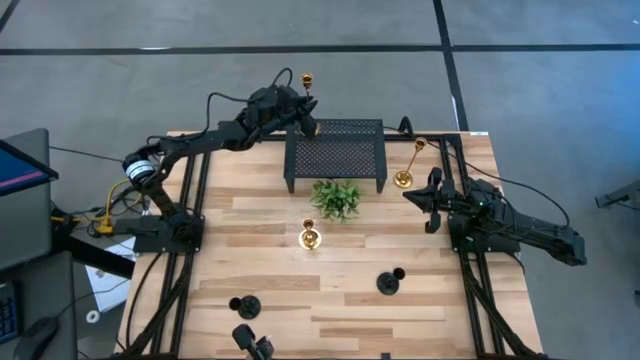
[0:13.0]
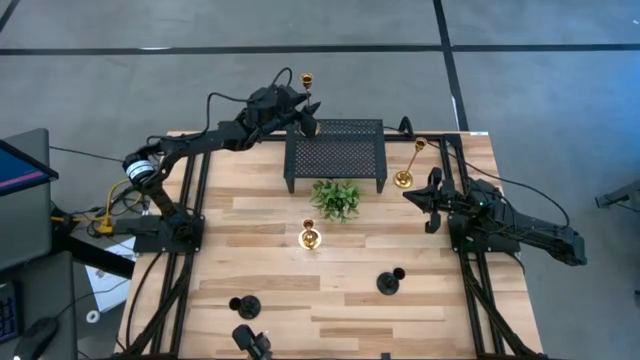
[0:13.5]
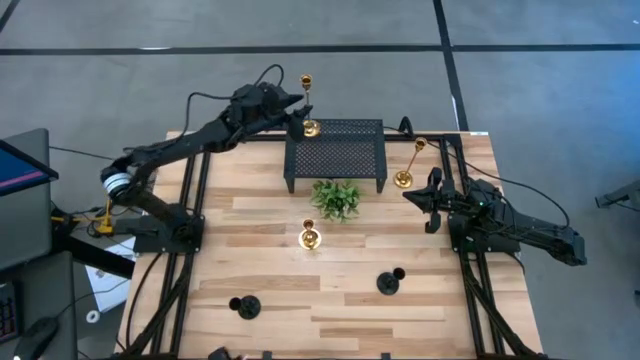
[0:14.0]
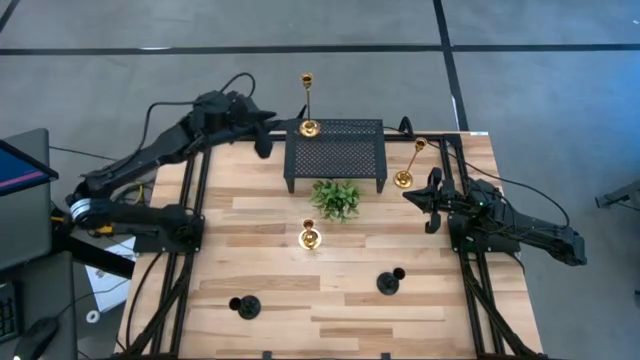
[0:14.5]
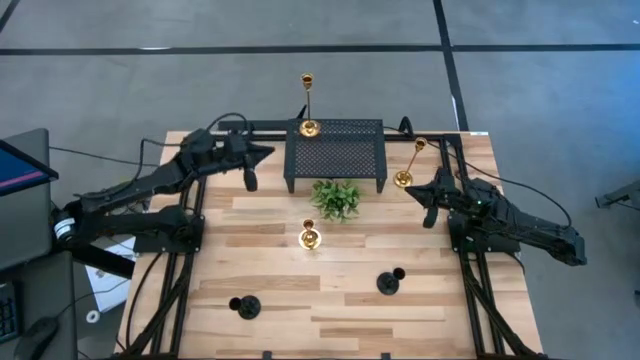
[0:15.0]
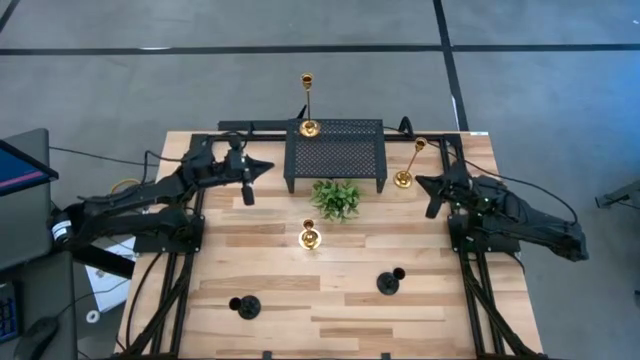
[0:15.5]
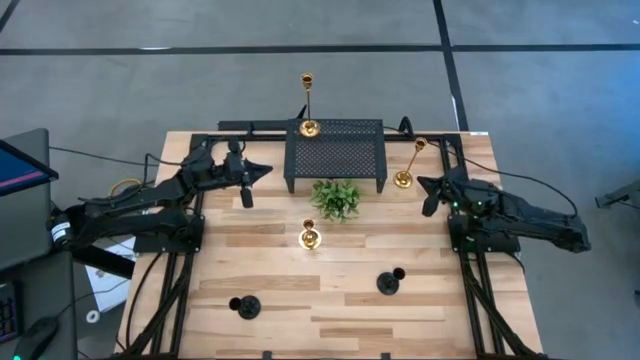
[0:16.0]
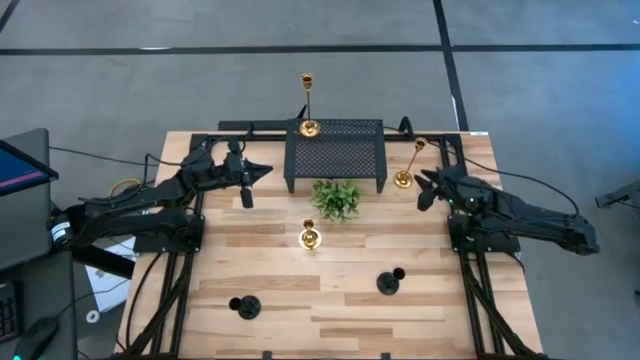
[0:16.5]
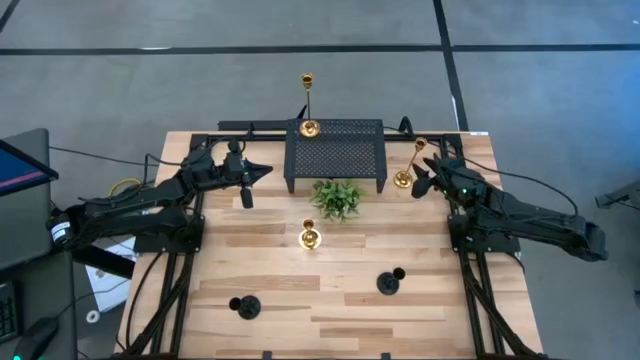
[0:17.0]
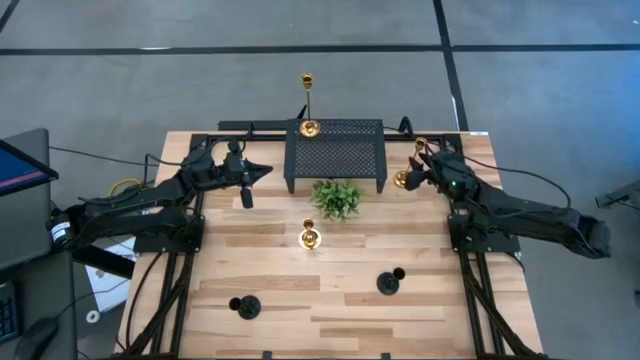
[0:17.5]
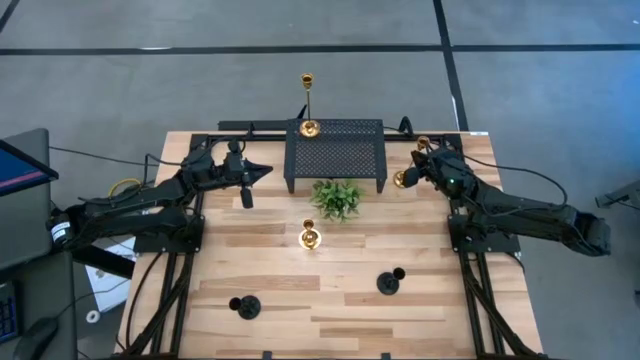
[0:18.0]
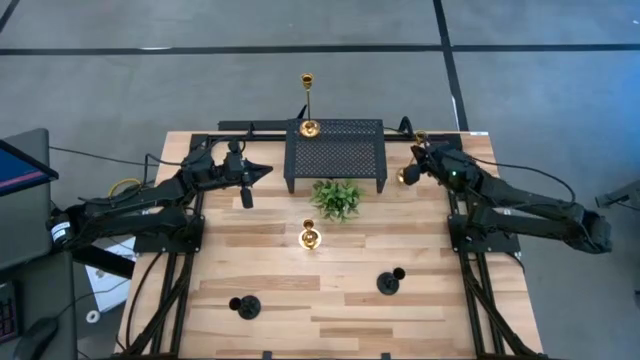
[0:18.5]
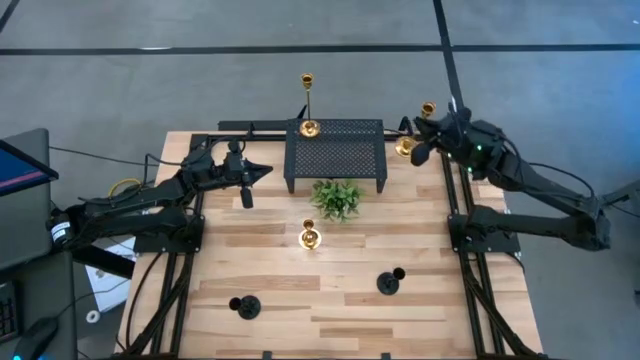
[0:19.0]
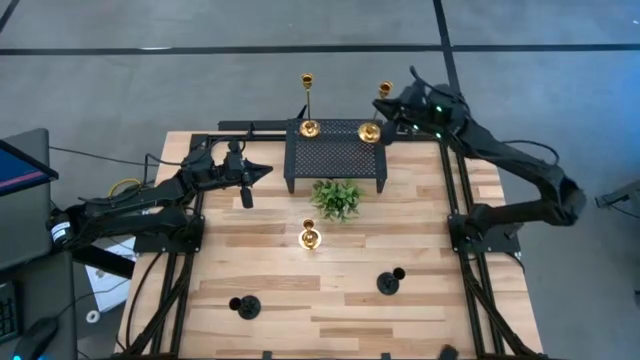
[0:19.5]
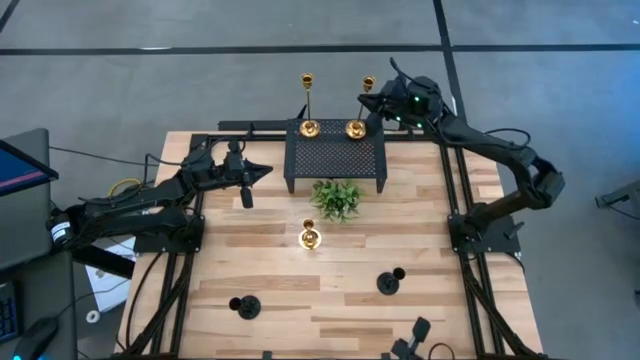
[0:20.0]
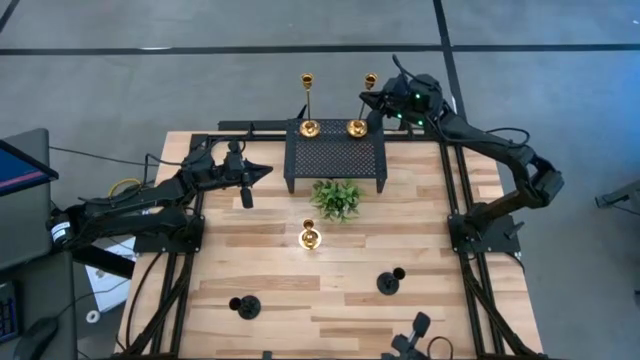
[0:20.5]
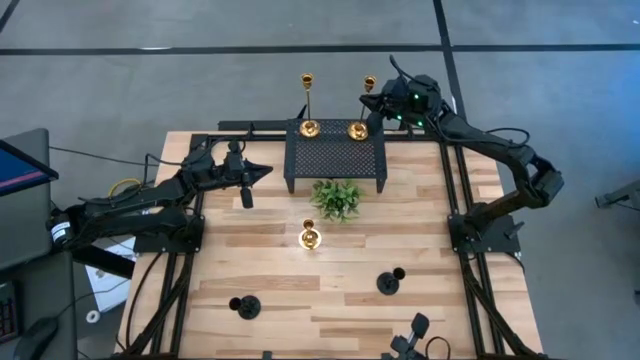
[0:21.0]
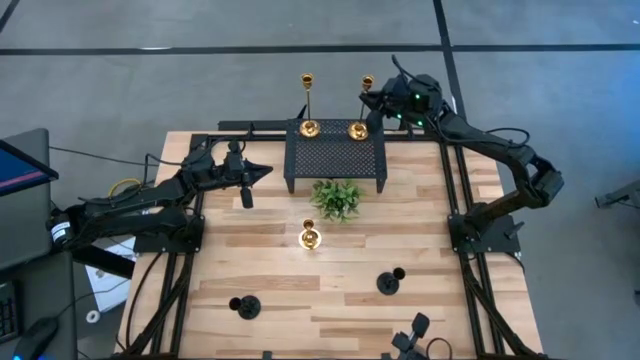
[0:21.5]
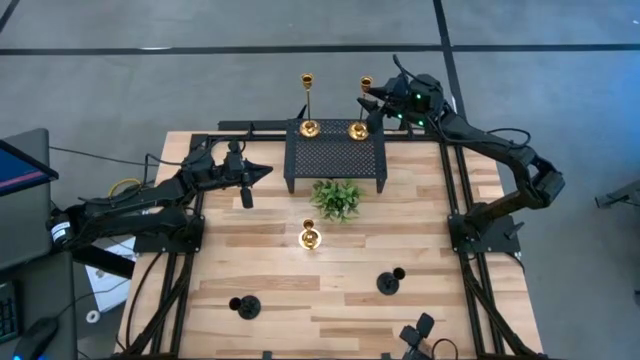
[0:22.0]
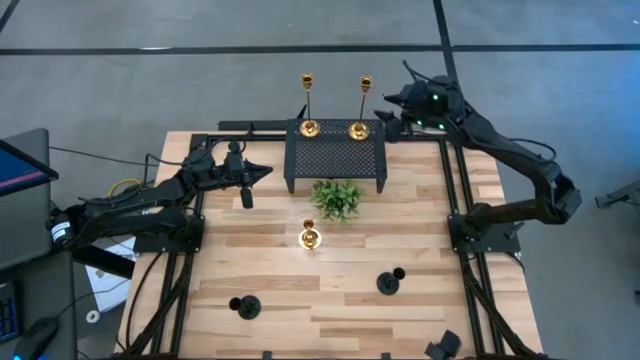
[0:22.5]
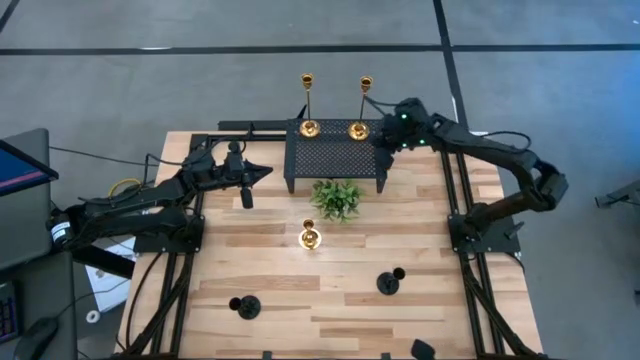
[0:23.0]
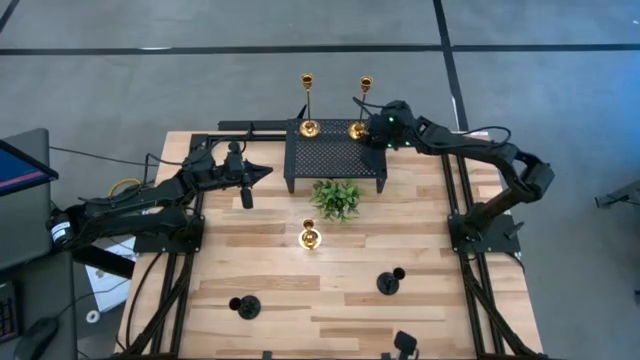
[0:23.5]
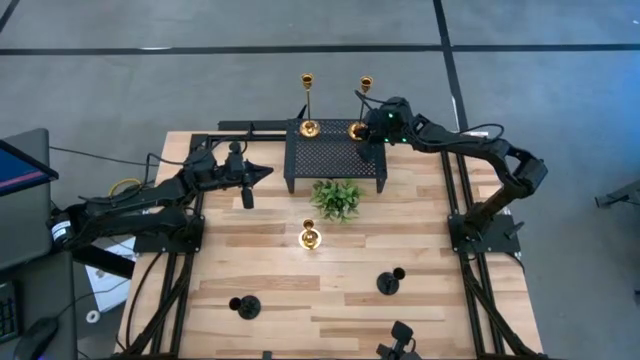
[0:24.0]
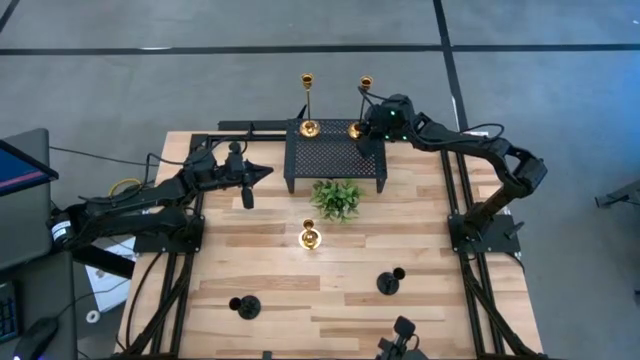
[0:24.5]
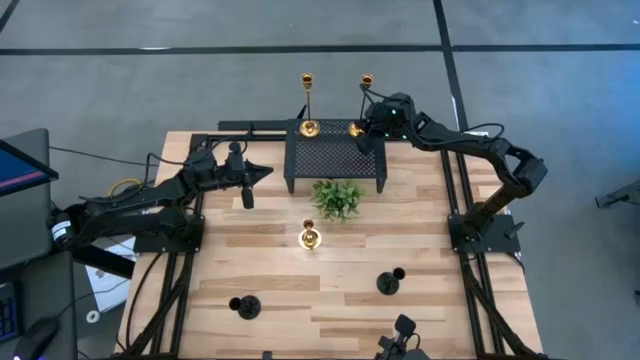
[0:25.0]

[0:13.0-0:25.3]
Task: Pick & Place candle stick holders
Put the right gold candle holder on the shelf

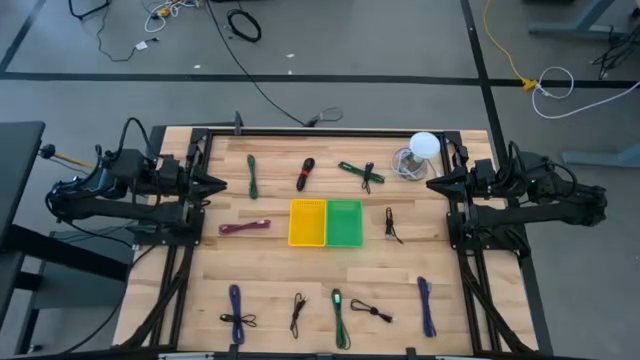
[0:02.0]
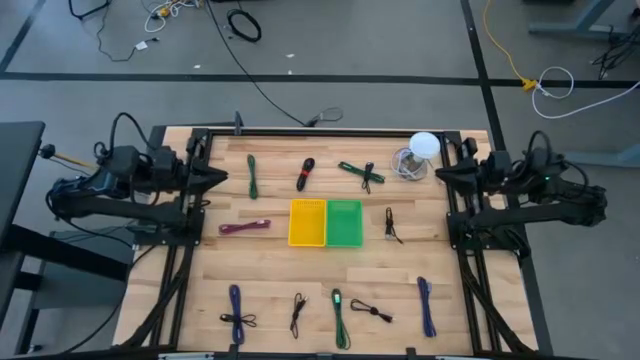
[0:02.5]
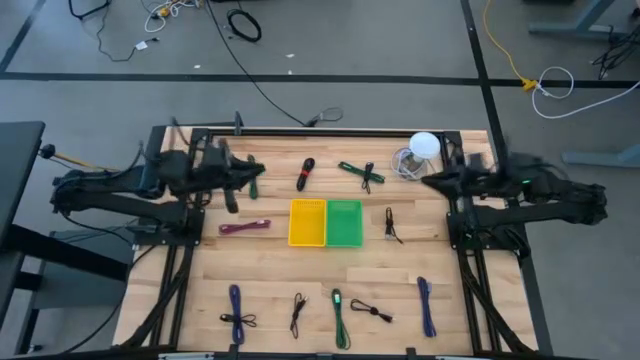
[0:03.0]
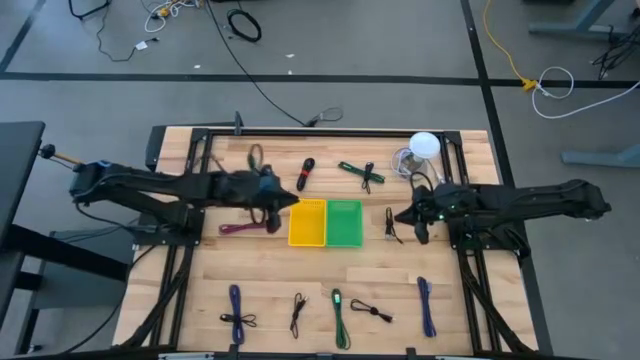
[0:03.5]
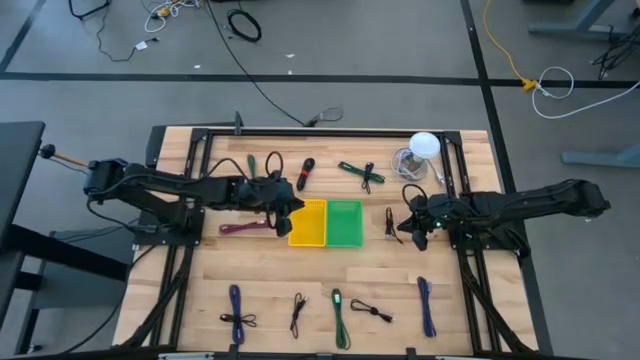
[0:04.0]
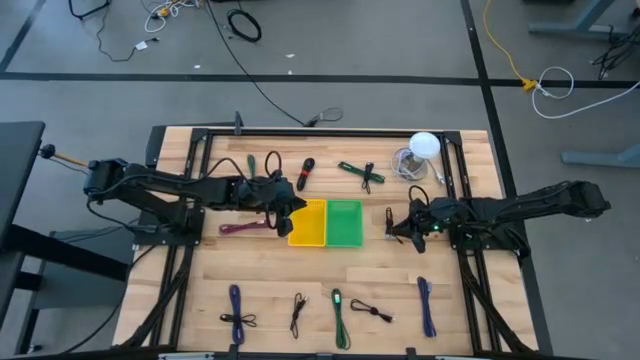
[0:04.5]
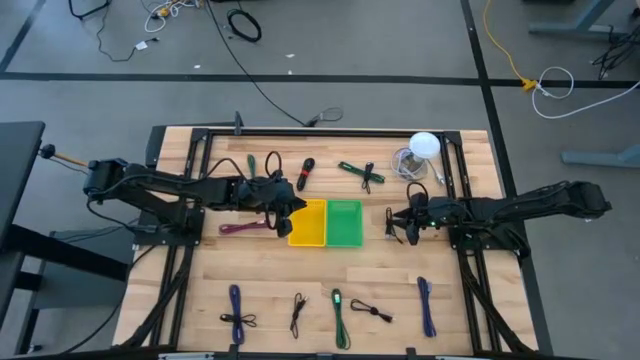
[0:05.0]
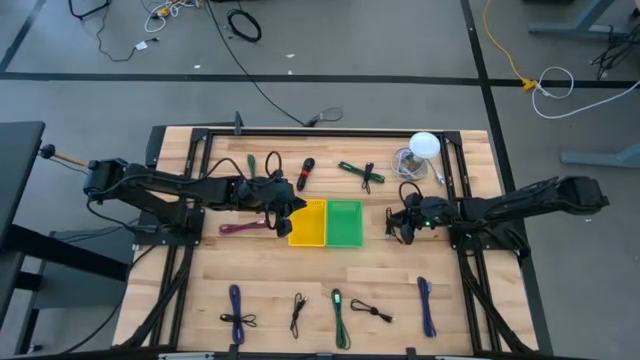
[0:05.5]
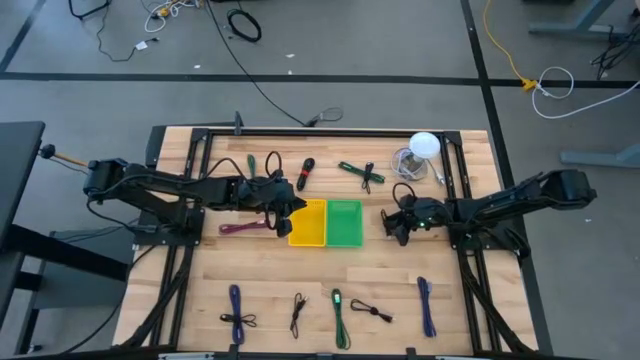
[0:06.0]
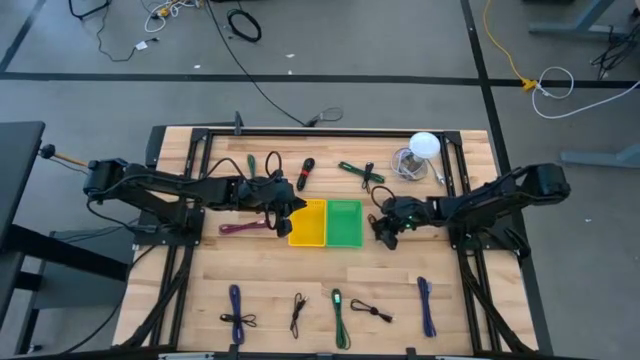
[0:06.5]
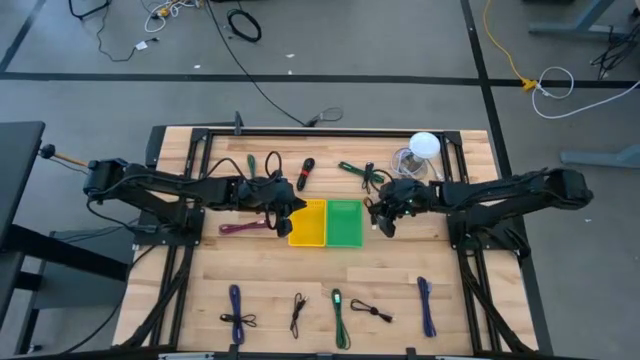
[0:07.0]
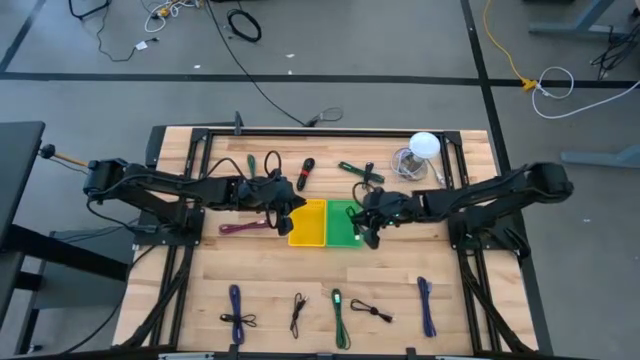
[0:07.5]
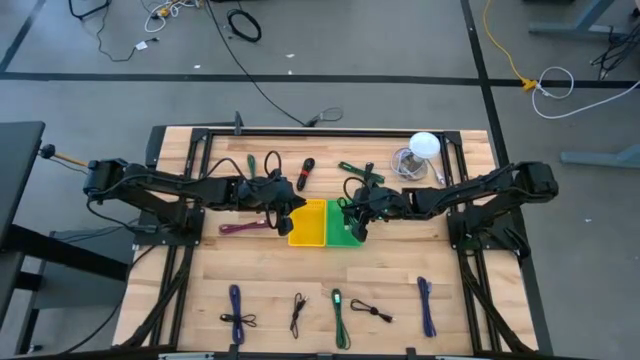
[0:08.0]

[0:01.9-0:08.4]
Task: Pick & Place USB Port
Put the black charger cable into the green basket

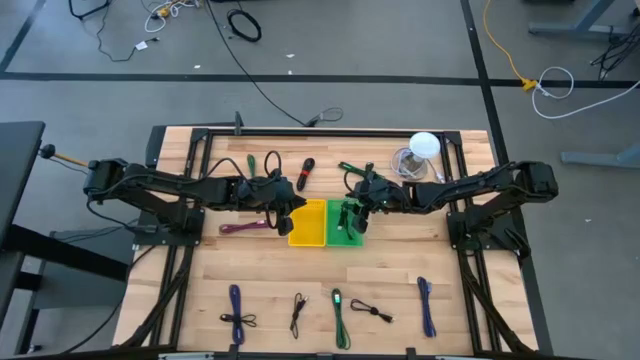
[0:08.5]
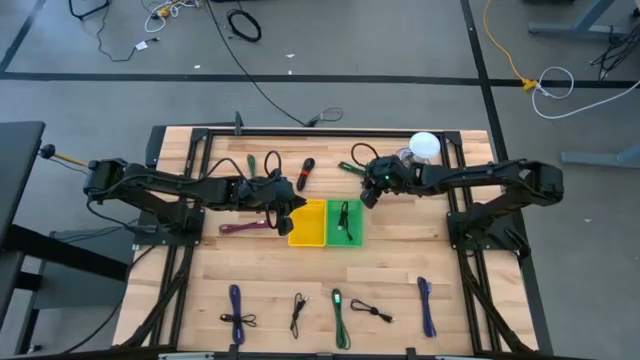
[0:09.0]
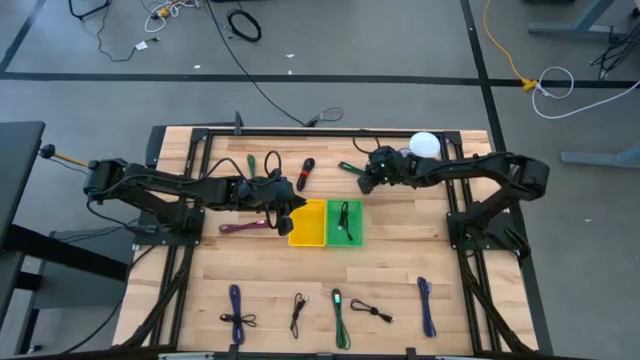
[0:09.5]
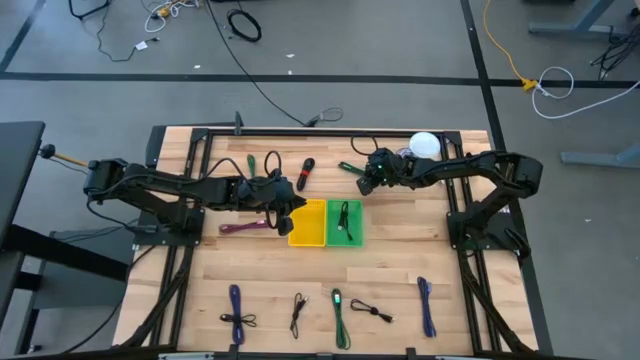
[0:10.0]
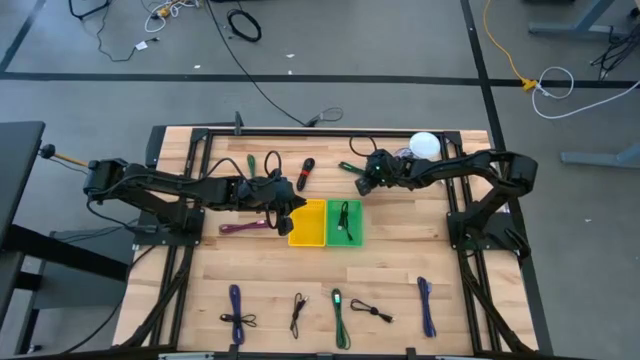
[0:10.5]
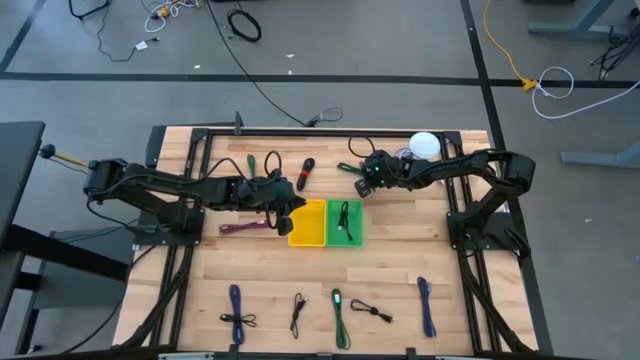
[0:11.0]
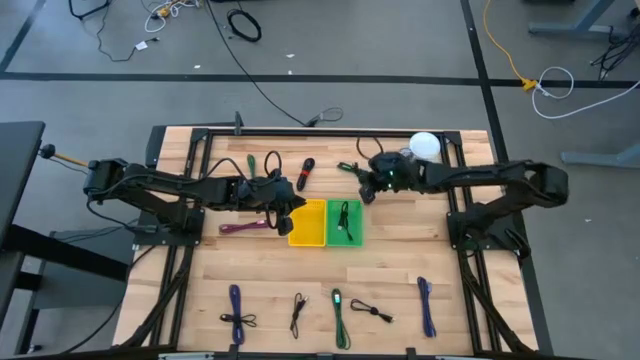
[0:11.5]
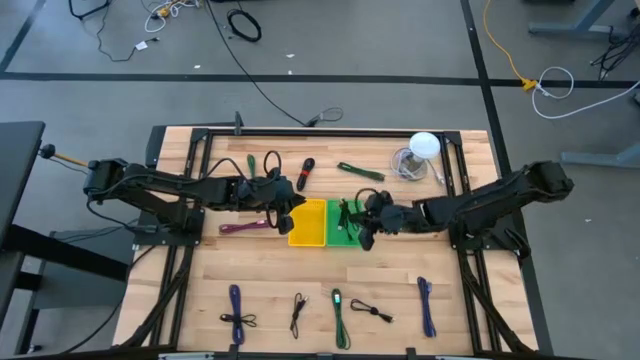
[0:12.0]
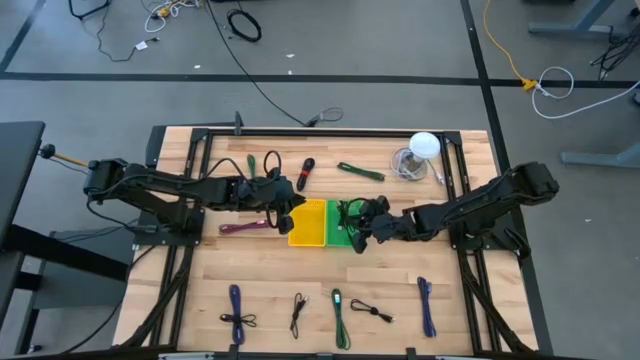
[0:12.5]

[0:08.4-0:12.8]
Put the black charger cable into the green basket
